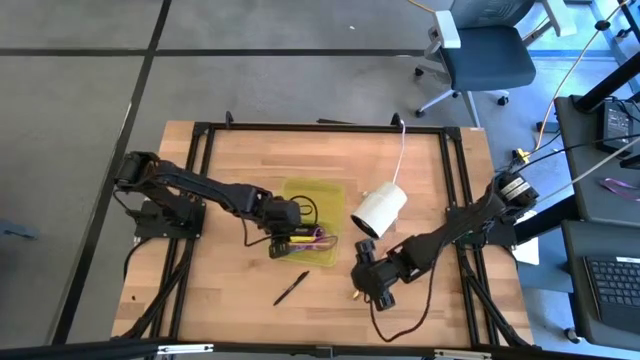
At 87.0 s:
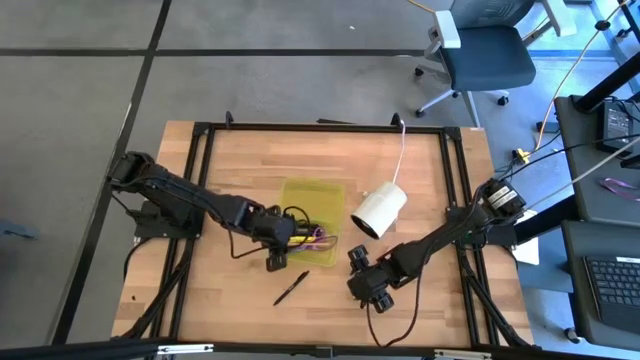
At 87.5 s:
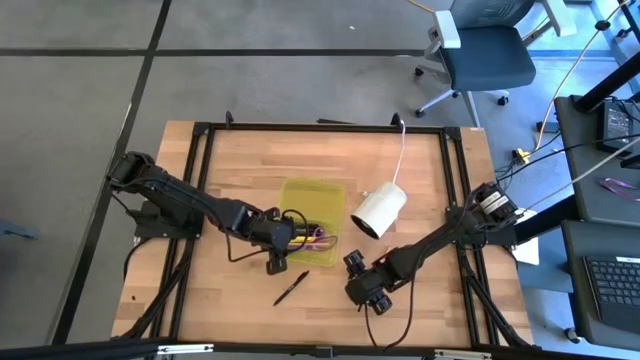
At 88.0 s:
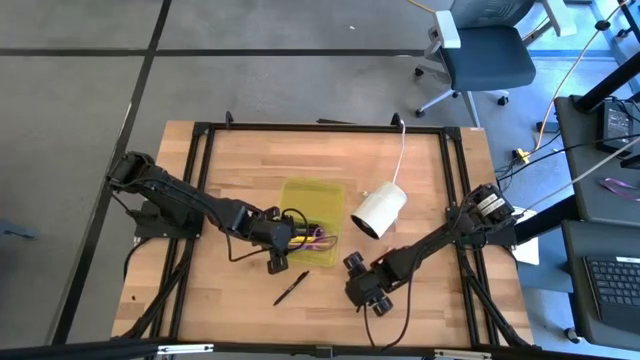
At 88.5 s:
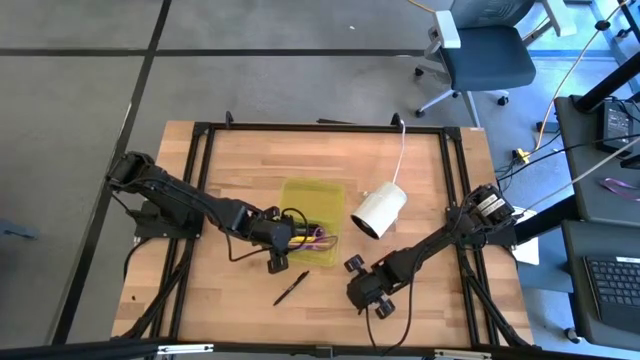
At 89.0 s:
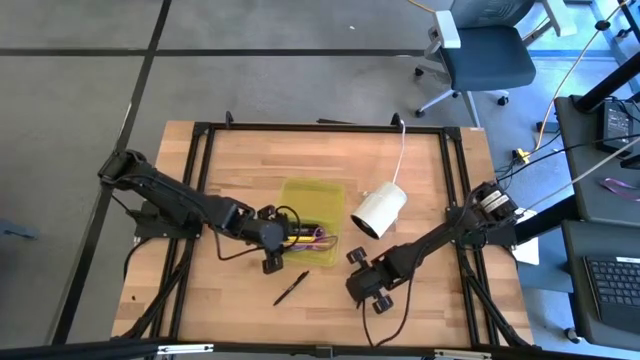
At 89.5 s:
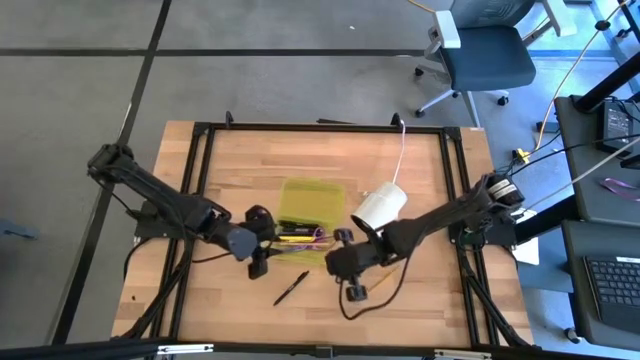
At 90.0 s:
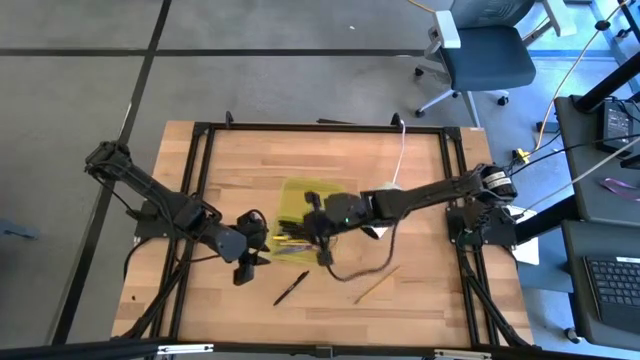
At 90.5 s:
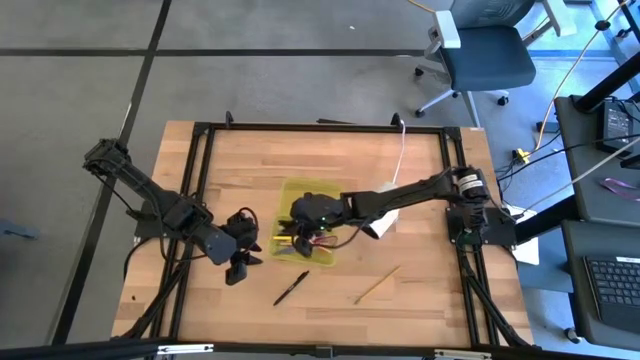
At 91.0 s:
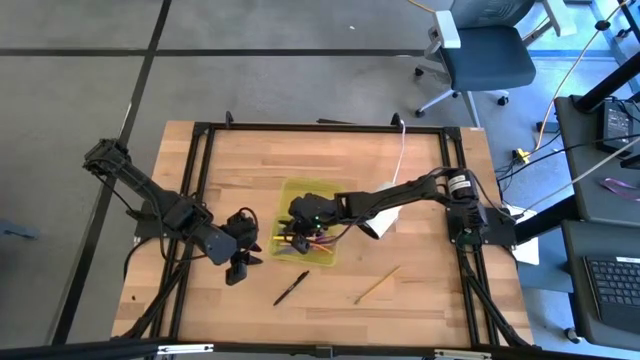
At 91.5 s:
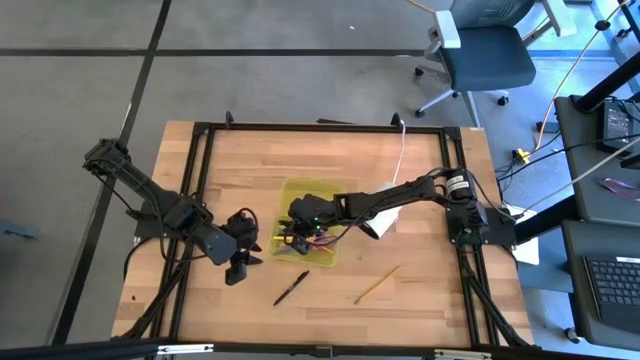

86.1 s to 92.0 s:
Task: Pick & place school supplies into a supply box
Put the orange pencil into the yellow supply box

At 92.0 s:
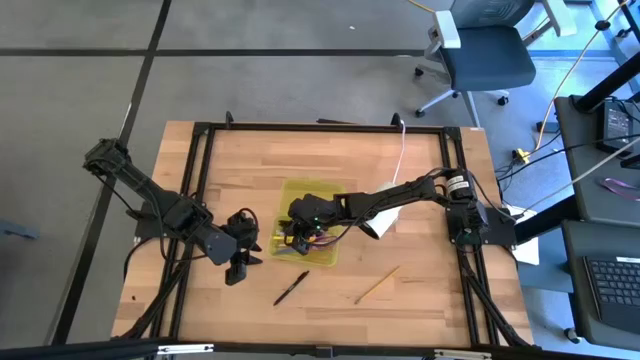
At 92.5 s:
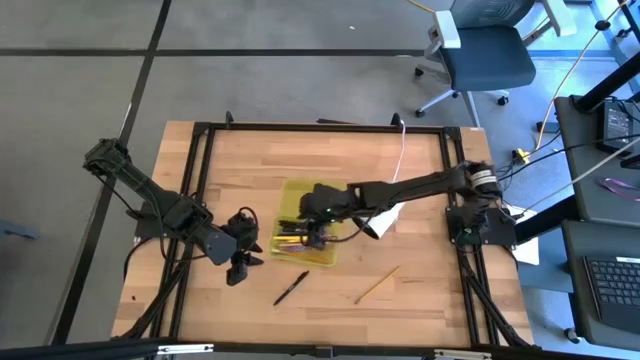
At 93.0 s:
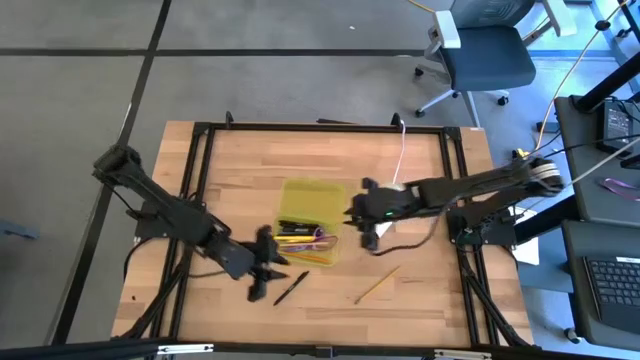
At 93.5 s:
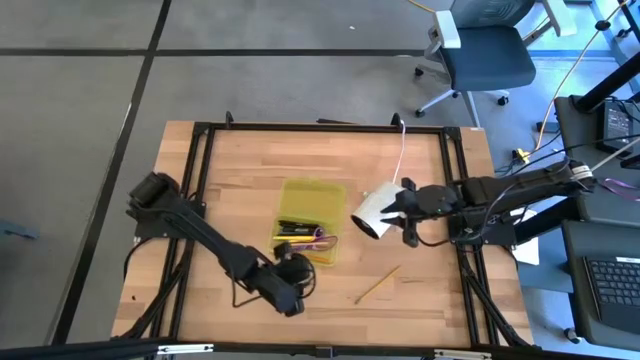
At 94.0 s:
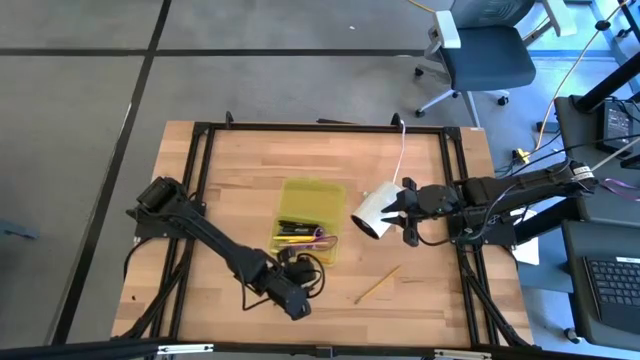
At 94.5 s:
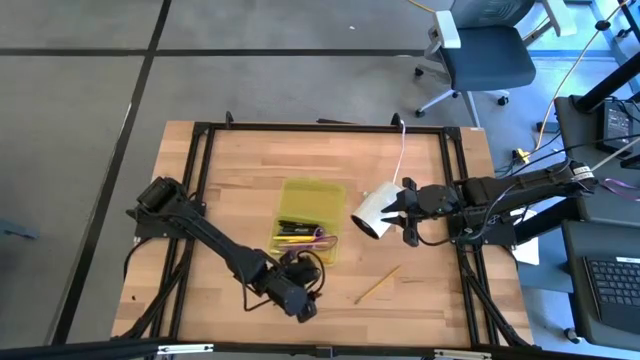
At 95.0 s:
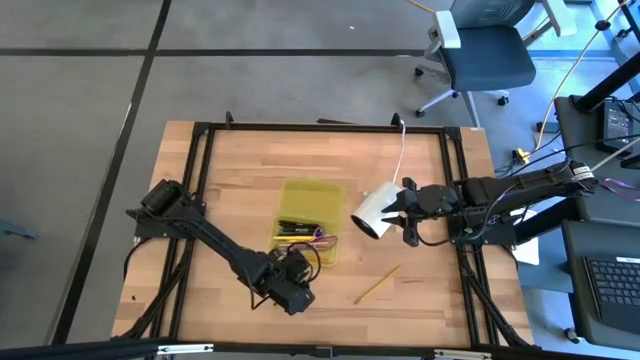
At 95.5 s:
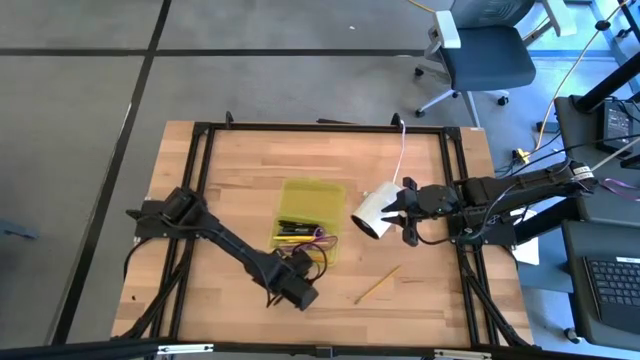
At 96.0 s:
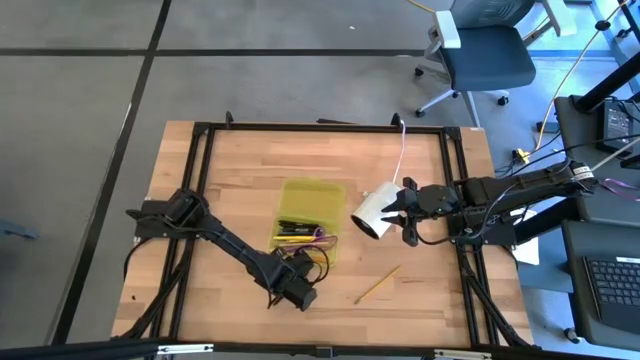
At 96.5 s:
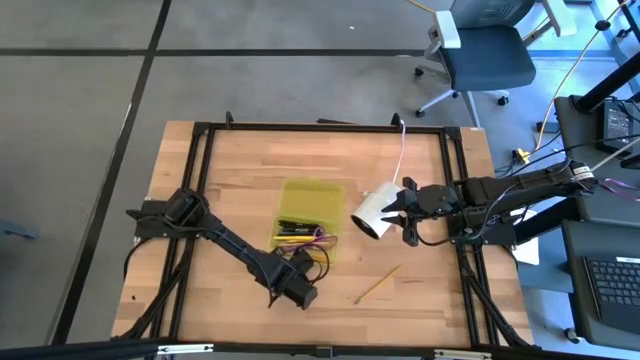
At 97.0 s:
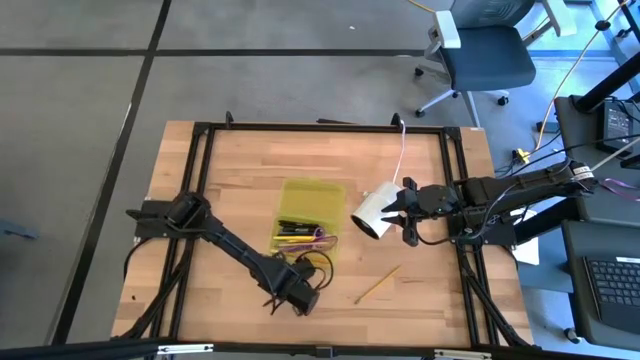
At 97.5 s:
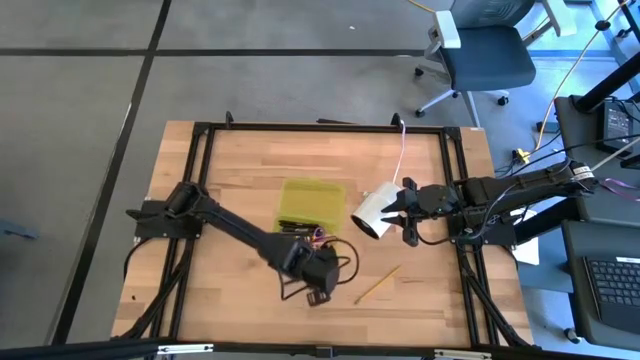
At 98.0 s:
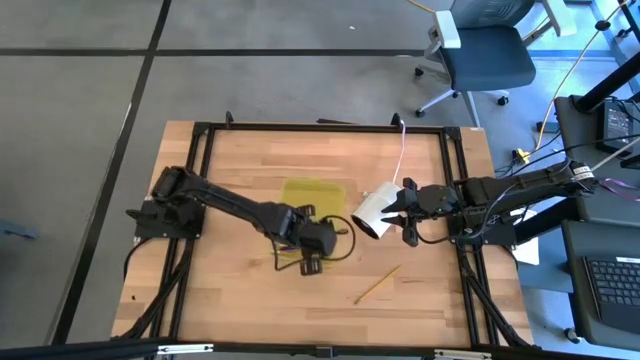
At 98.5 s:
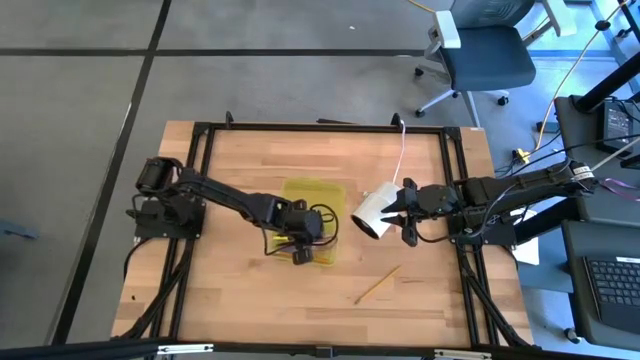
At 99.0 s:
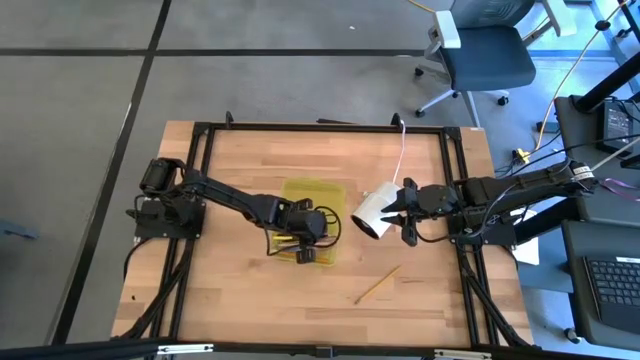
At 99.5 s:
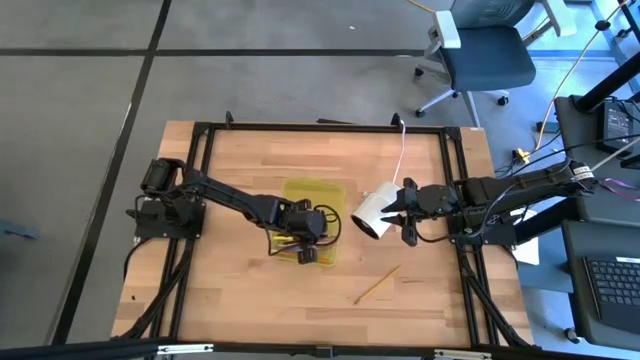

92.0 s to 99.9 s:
Put the black pen into the yellow supply box

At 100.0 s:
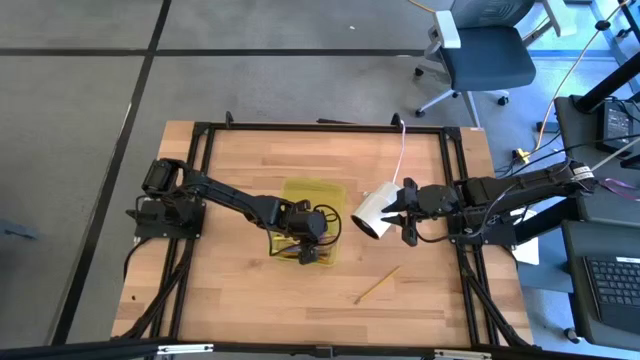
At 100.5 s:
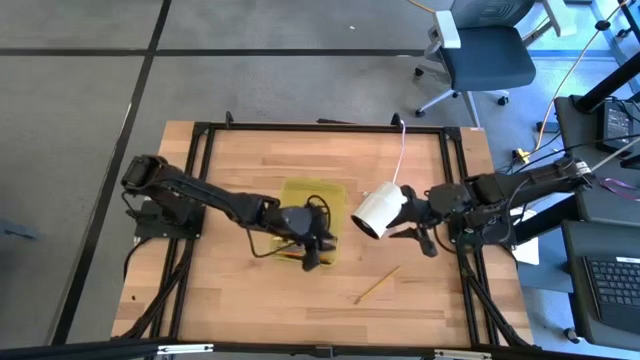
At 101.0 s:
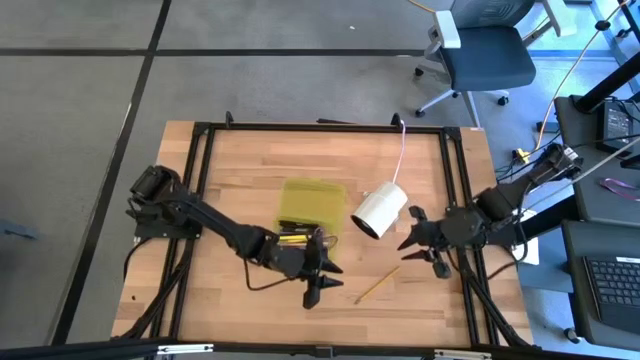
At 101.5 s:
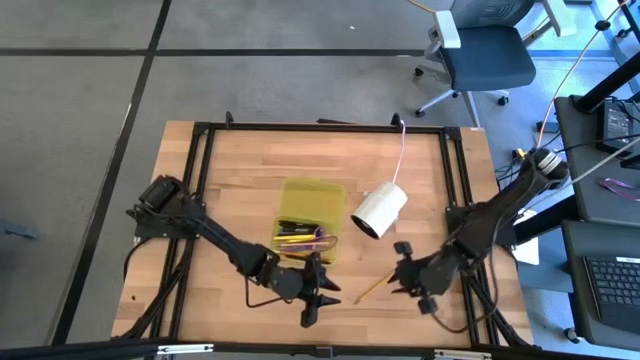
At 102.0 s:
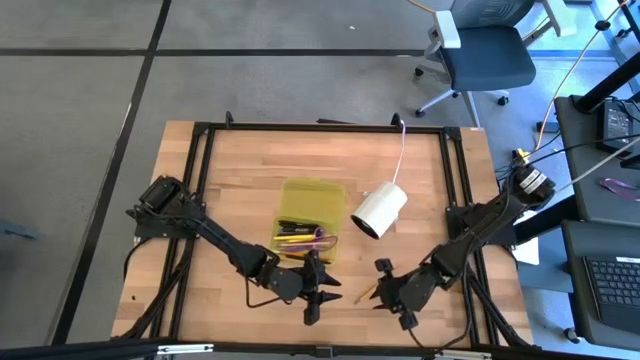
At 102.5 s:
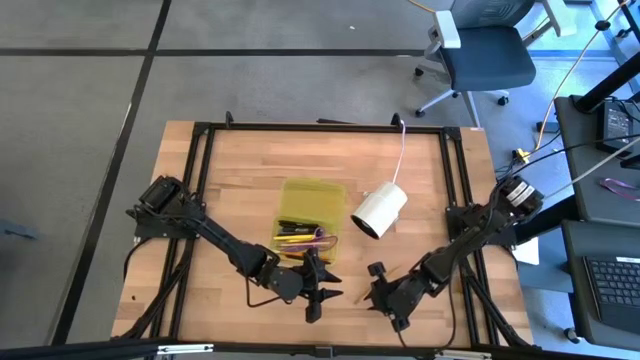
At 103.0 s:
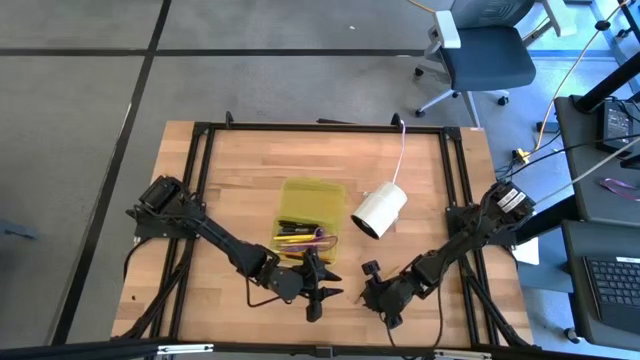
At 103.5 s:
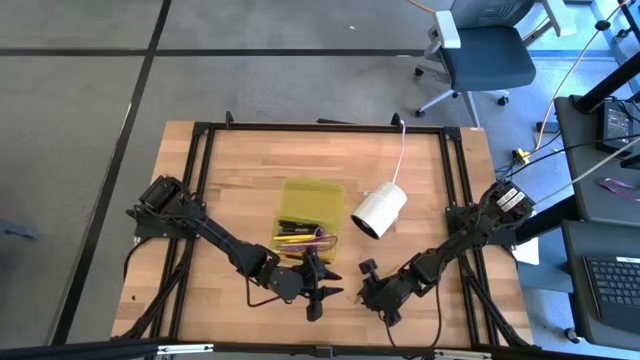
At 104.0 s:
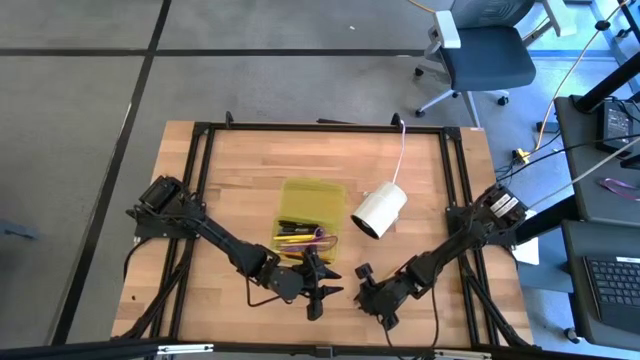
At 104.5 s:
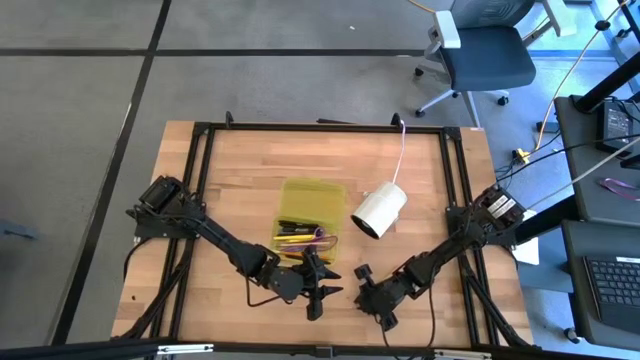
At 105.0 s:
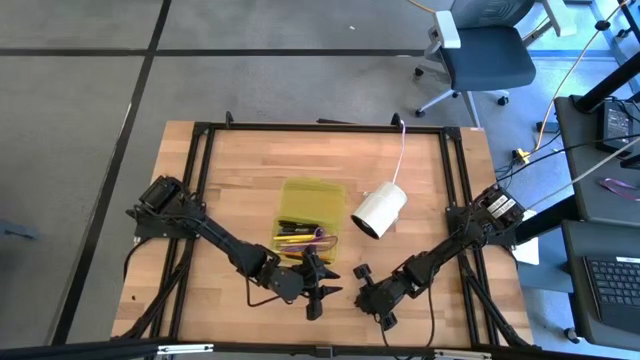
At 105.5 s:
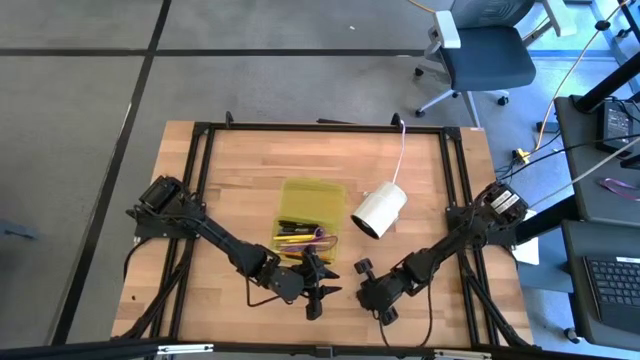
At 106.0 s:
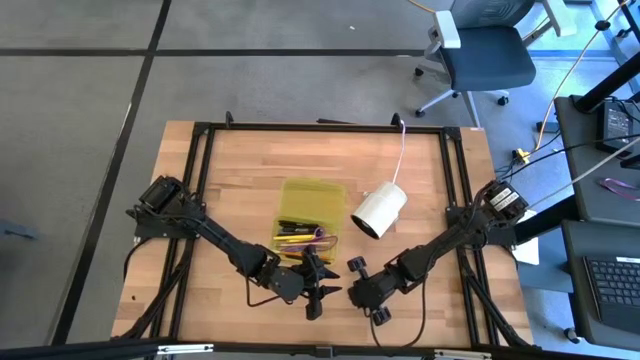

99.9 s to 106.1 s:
Put the yellow pencil into the yellow supply box
